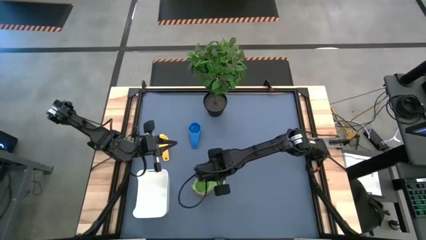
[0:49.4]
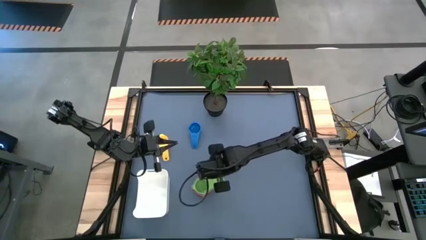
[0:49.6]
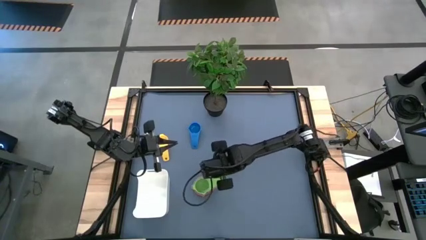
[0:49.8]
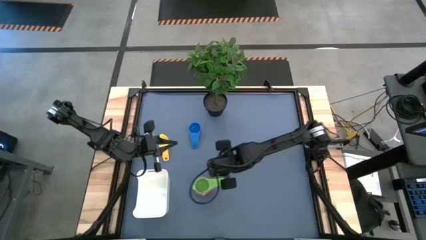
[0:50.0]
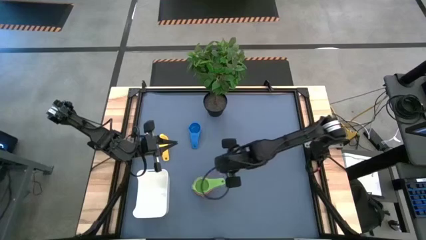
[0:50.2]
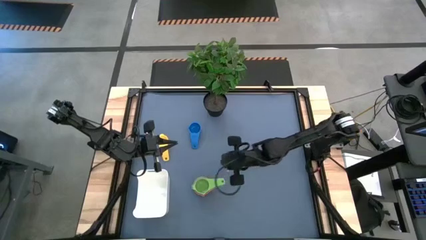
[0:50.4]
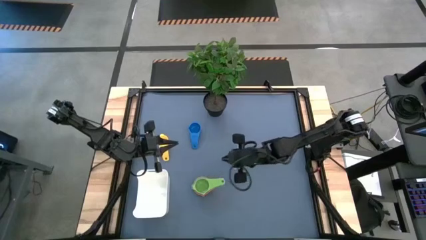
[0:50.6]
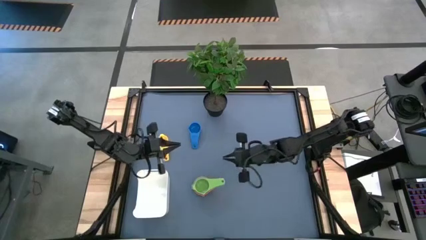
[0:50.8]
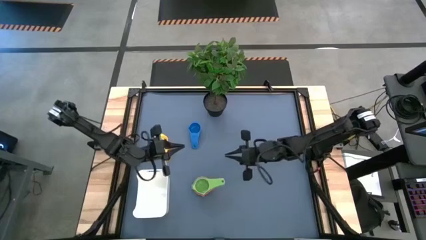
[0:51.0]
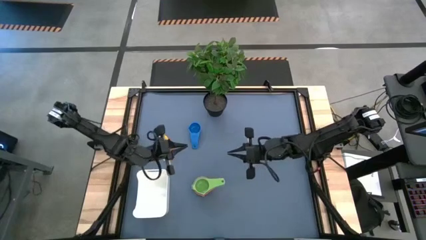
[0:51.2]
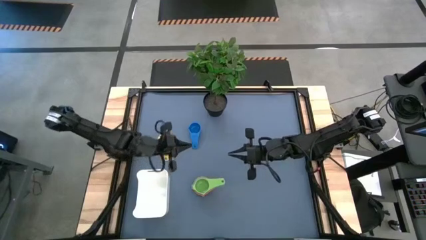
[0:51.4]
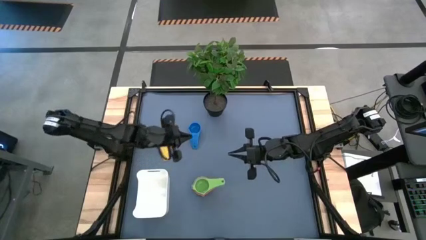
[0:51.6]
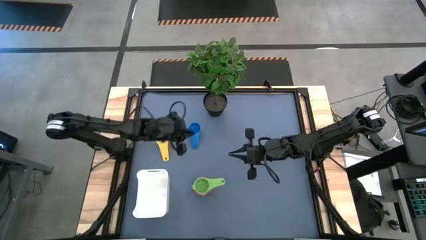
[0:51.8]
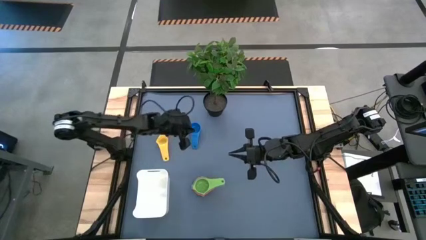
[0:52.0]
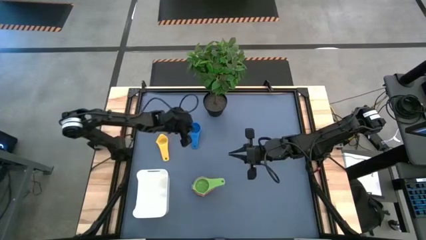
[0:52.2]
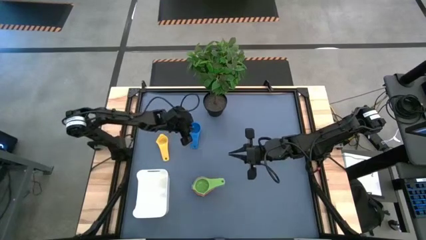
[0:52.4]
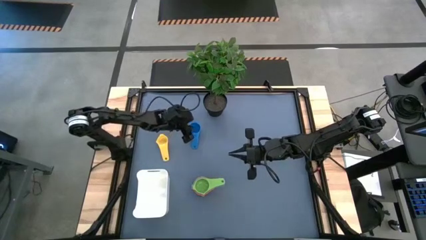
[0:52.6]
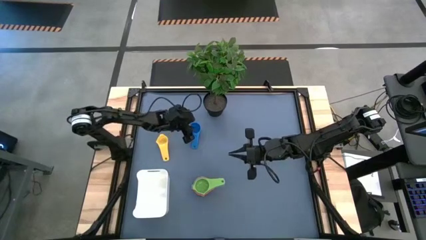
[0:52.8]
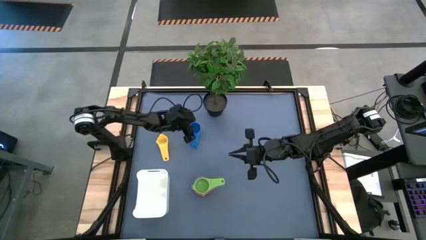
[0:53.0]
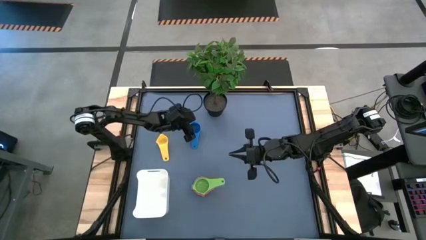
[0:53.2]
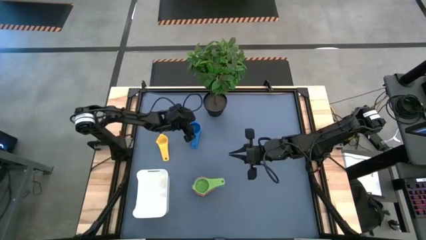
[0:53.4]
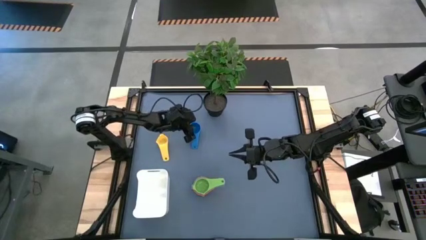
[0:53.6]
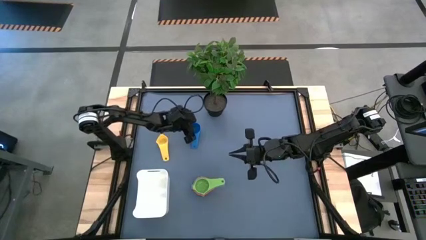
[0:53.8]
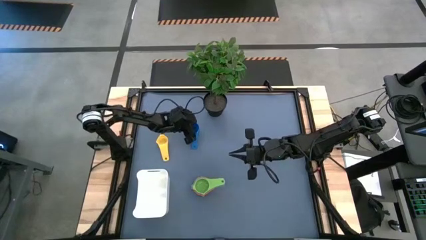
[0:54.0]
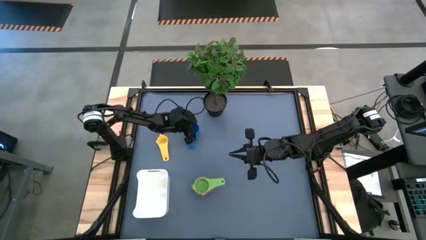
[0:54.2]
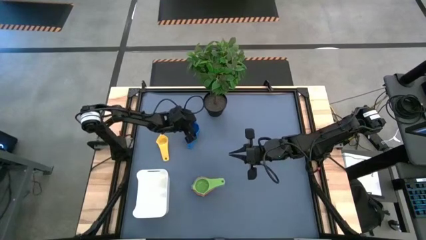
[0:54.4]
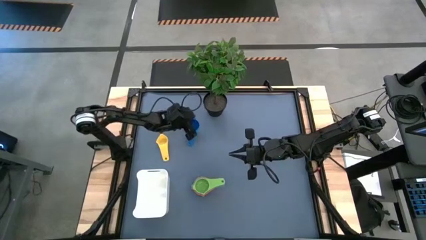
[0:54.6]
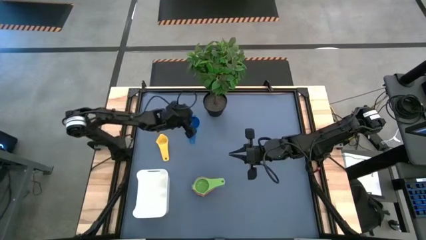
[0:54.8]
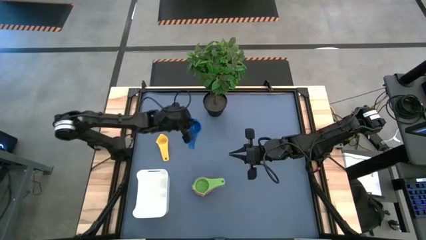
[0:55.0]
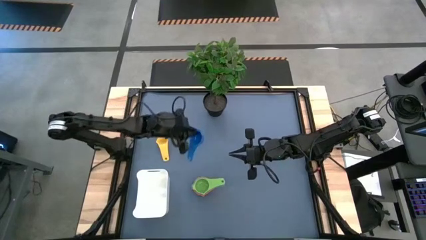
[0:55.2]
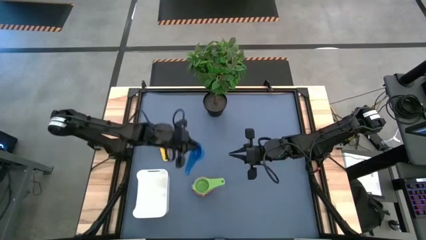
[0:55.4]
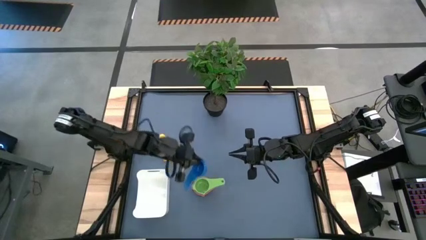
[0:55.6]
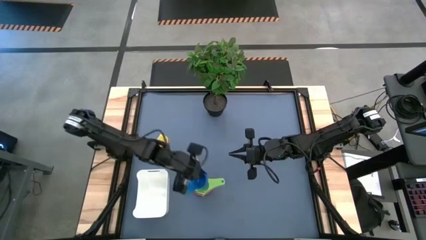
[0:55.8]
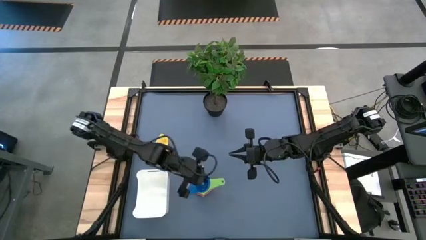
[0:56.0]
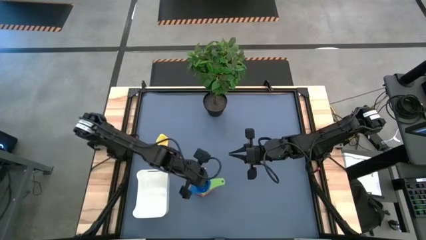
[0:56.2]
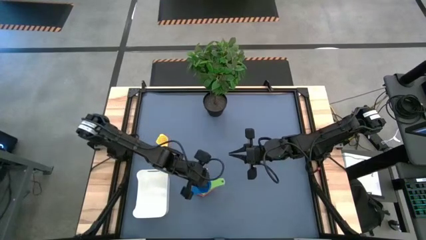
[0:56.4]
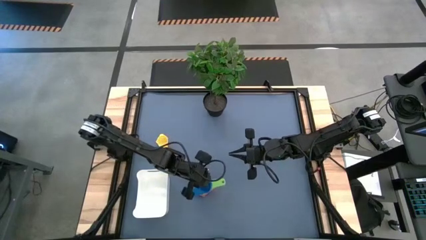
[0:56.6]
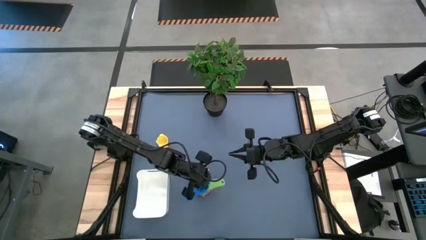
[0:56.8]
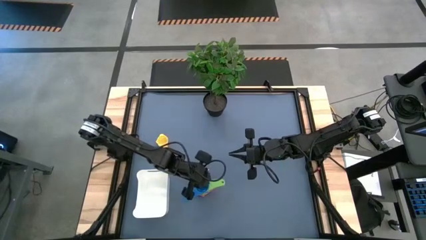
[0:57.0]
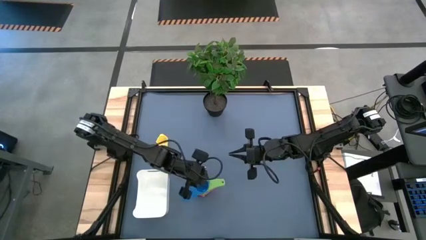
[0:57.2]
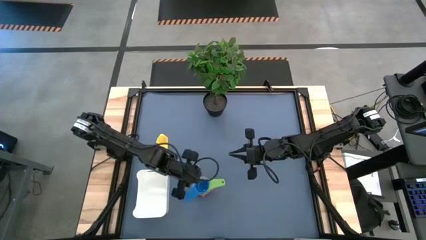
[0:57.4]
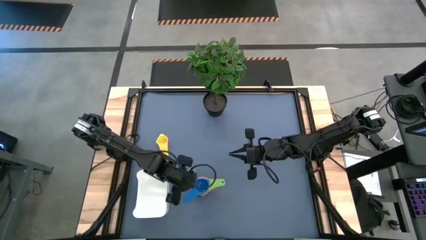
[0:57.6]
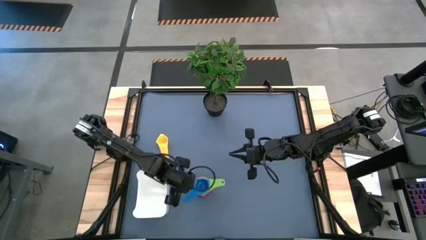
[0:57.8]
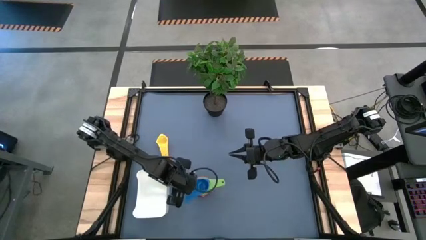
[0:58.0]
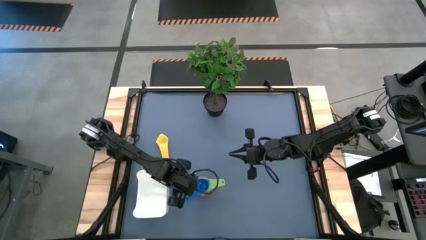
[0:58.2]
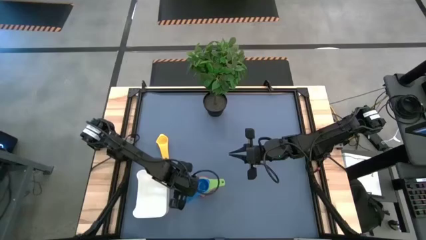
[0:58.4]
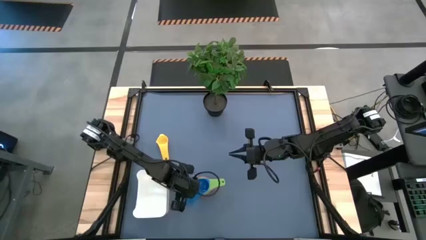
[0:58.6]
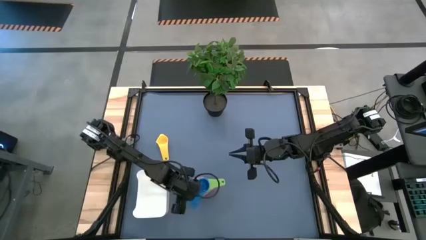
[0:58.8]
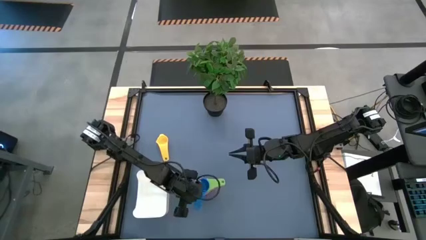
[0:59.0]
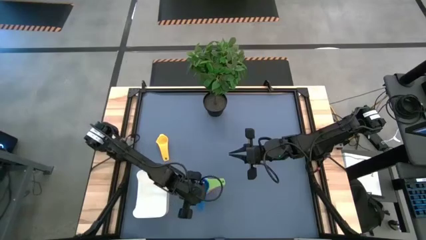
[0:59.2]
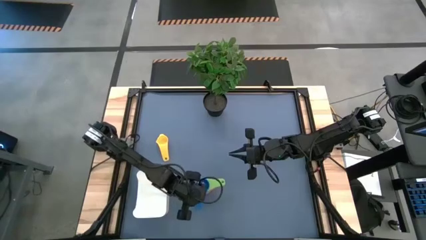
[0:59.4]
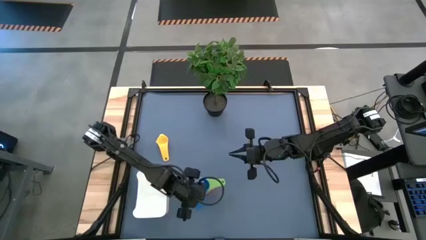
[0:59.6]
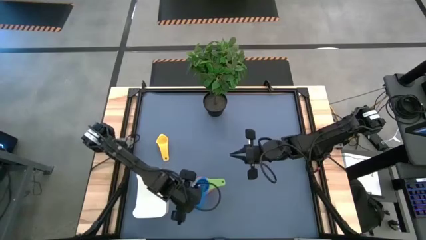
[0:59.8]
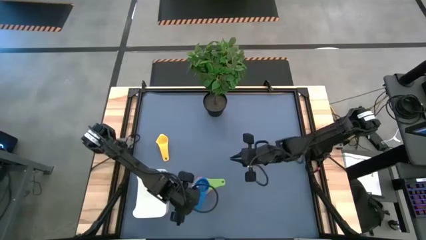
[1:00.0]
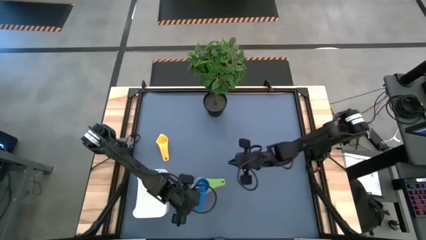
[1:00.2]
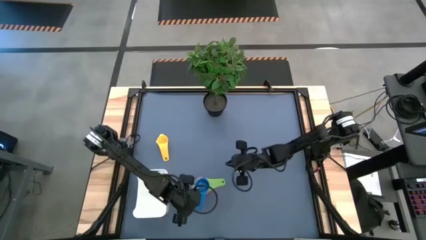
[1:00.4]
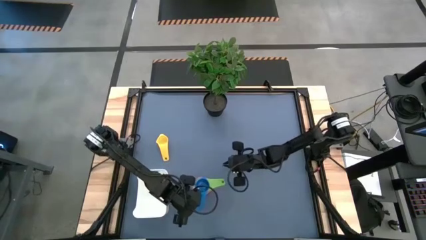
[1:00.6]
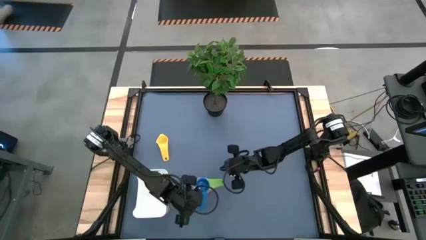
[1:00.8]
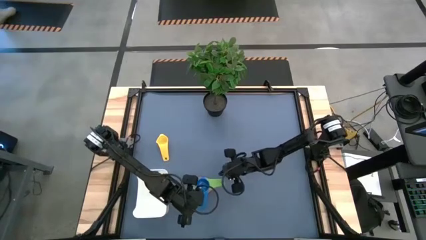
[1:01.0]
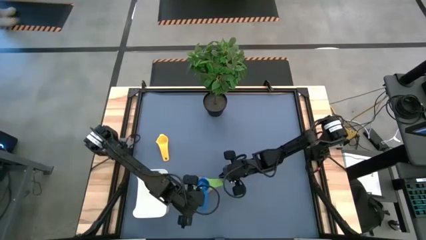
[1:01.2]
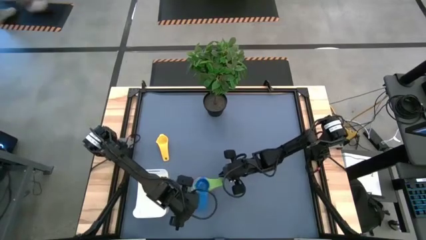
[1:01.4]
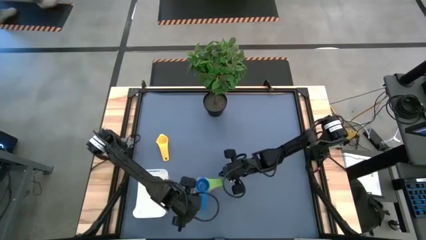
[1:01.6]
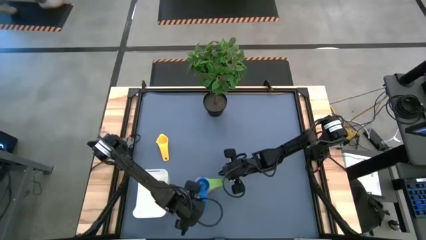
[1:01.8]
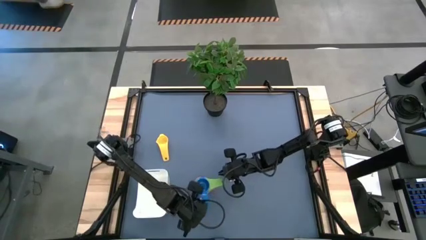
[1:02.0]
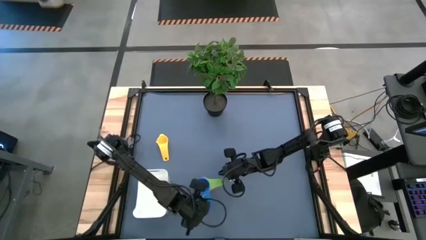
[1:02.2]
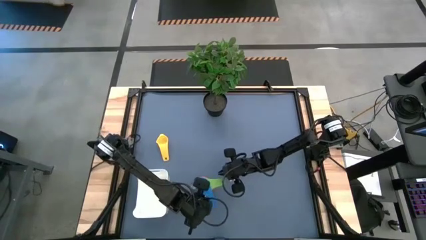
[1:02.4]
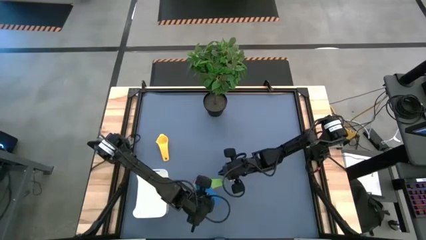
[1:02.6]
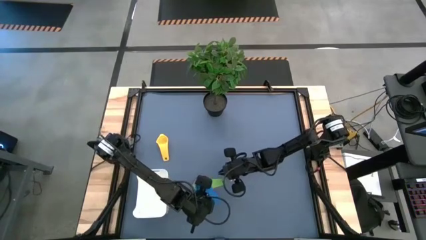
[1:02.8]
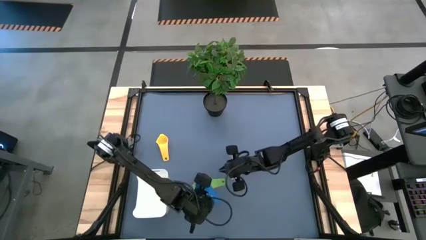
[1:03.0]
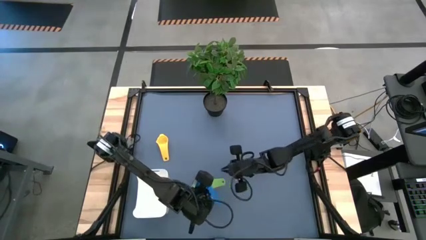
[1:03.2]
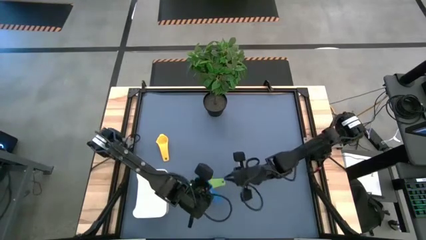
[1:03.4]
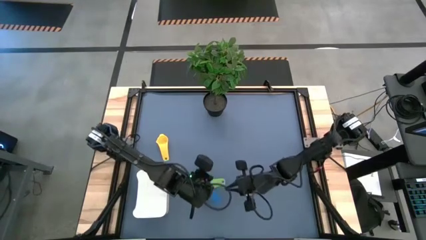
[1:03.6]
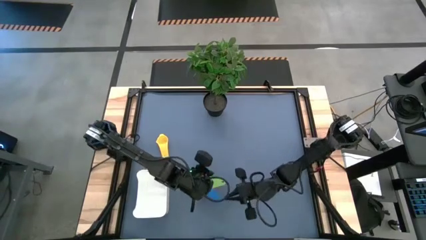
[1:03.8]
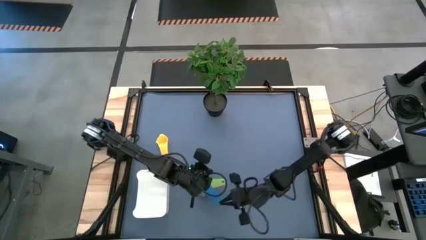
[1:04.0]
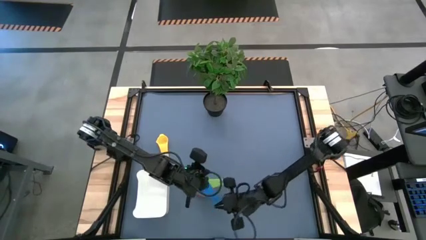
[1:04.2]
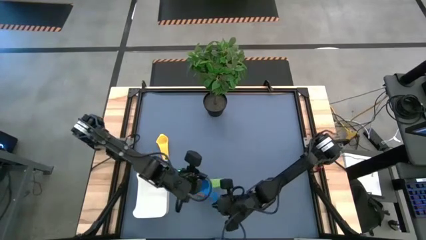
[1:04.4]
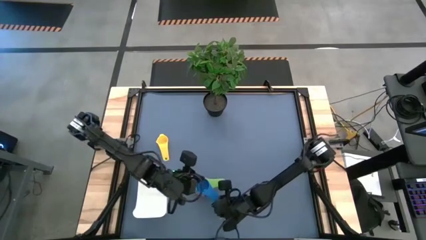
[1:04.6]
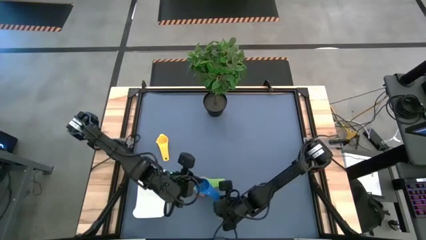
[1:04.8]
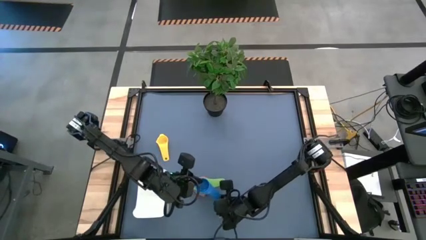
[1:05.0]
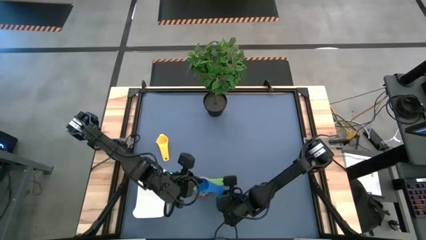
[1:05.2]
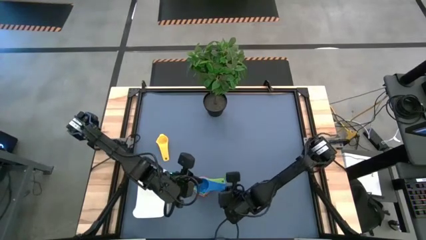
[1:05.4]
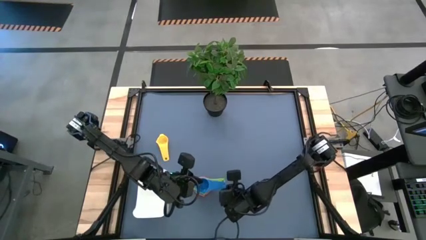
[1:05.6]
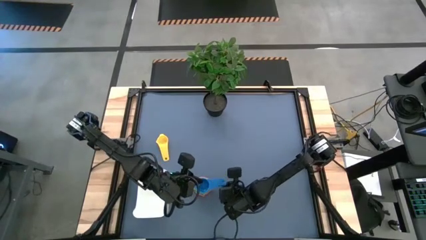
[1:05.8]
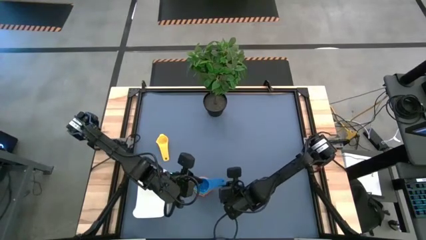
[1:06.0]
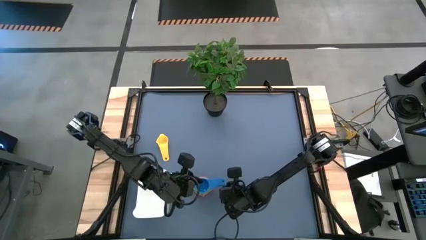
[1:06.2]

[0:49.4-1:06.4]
Task: Nest measuring cups in basket
Stack the blue measuring cup on the light green measuring cup
